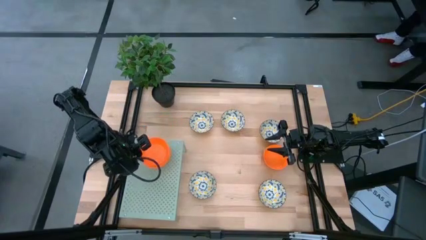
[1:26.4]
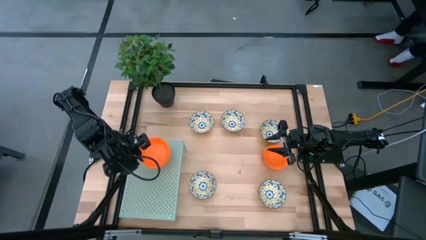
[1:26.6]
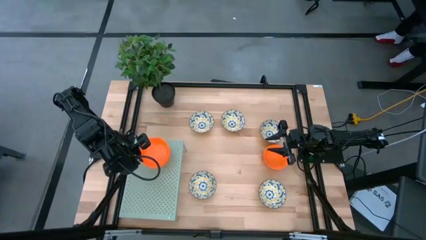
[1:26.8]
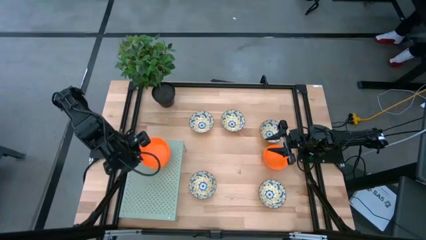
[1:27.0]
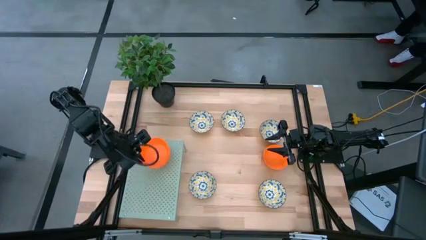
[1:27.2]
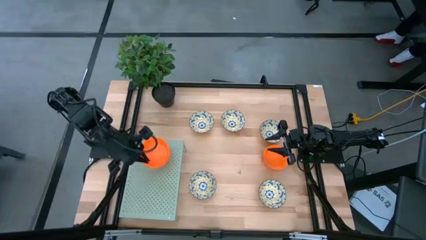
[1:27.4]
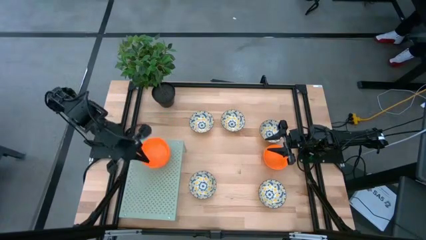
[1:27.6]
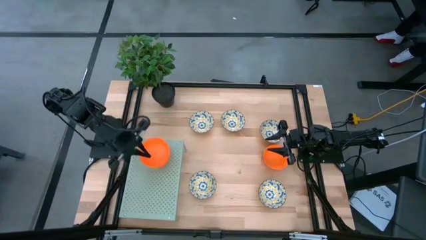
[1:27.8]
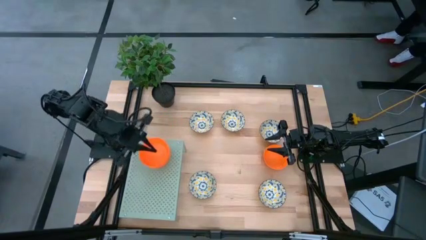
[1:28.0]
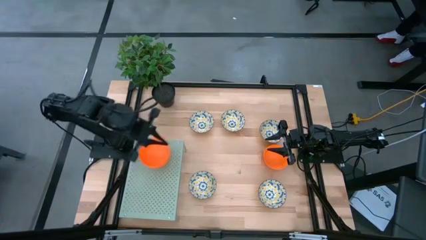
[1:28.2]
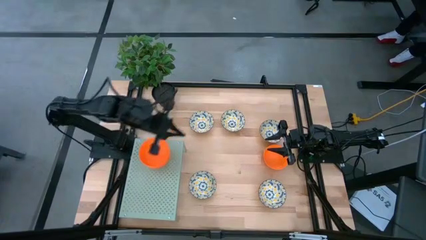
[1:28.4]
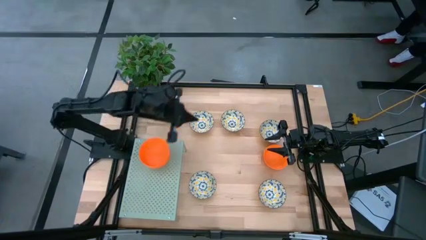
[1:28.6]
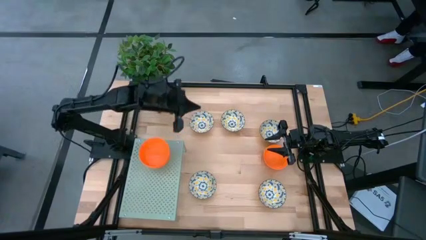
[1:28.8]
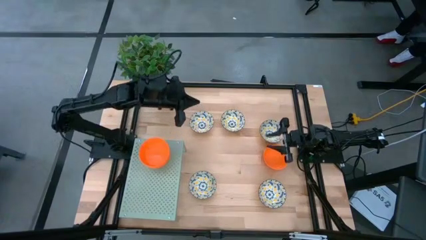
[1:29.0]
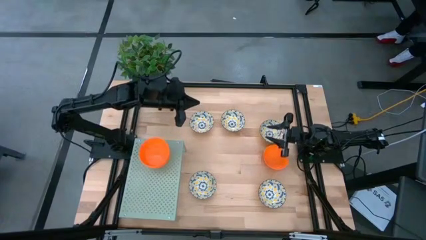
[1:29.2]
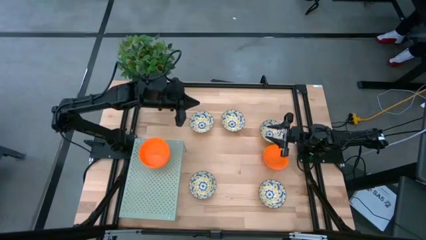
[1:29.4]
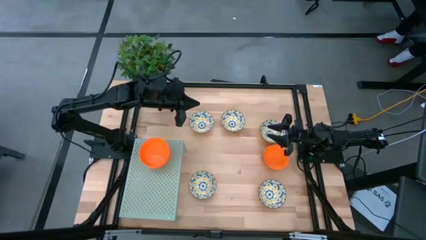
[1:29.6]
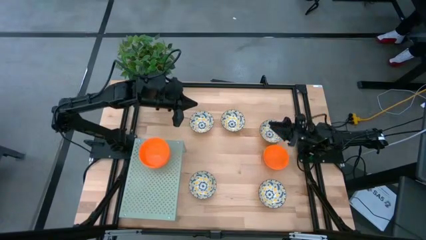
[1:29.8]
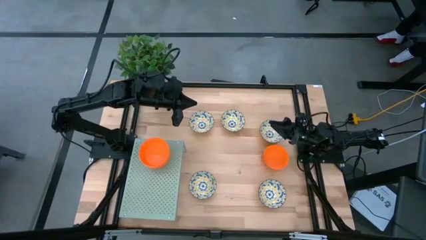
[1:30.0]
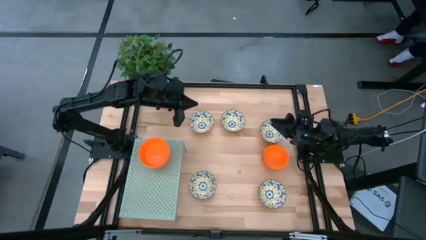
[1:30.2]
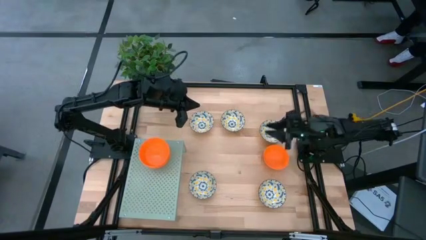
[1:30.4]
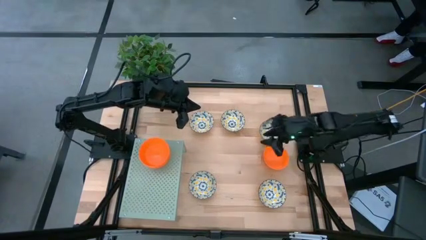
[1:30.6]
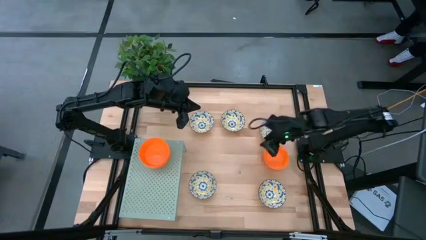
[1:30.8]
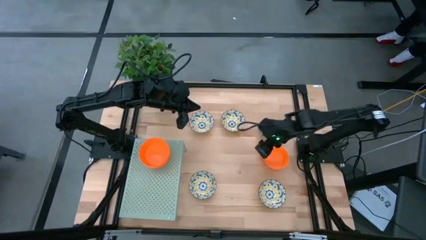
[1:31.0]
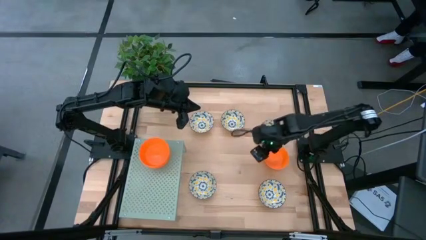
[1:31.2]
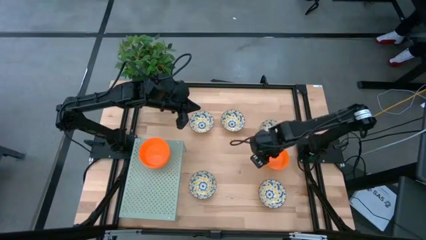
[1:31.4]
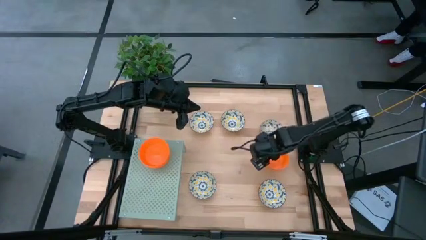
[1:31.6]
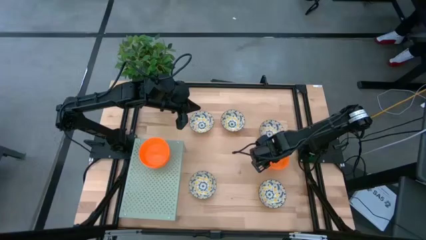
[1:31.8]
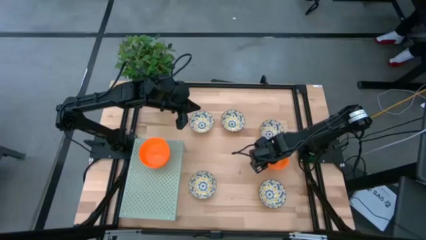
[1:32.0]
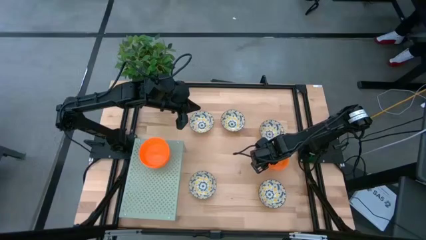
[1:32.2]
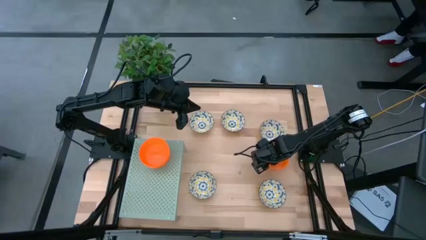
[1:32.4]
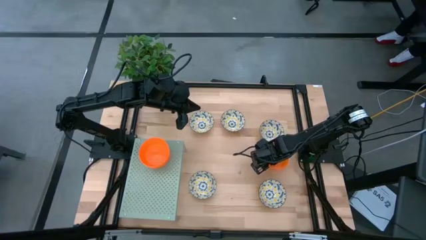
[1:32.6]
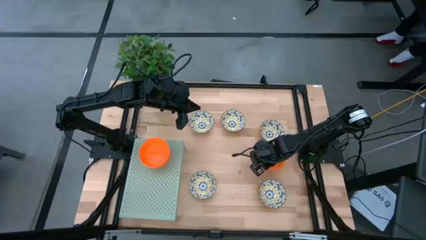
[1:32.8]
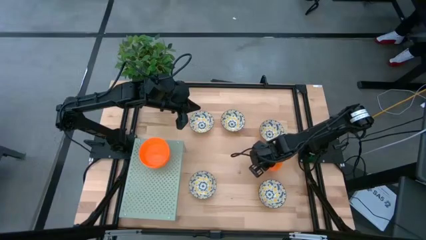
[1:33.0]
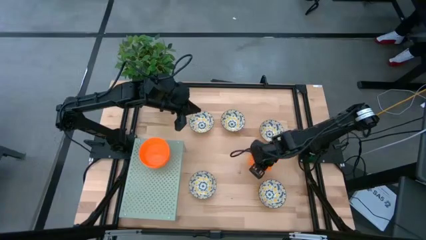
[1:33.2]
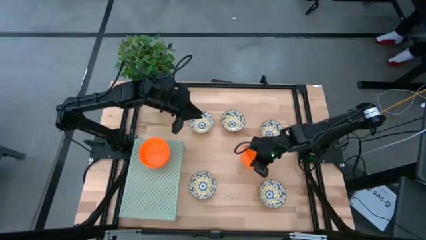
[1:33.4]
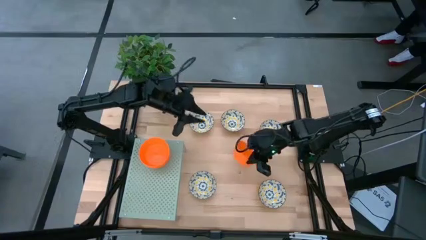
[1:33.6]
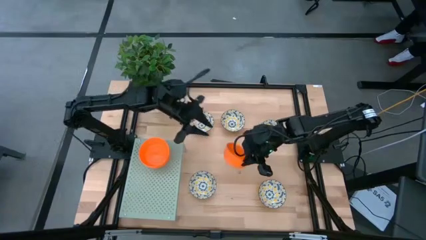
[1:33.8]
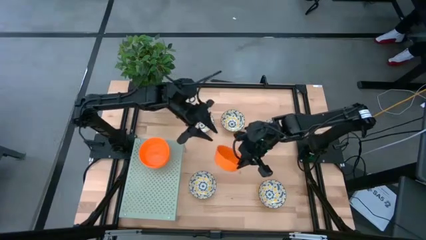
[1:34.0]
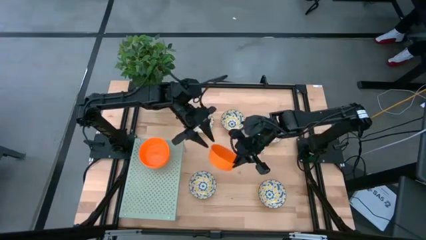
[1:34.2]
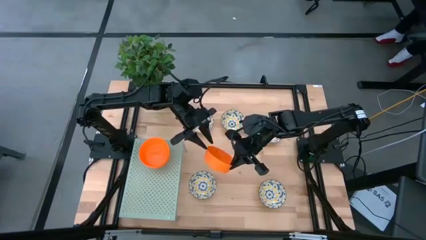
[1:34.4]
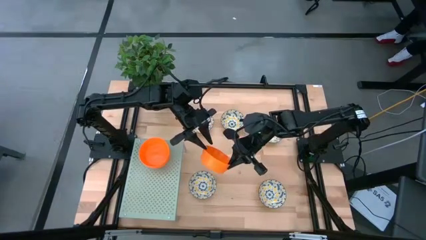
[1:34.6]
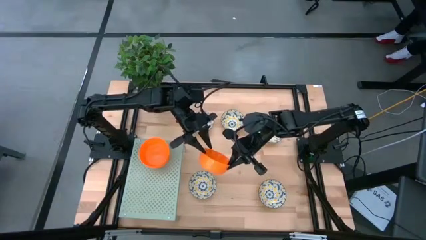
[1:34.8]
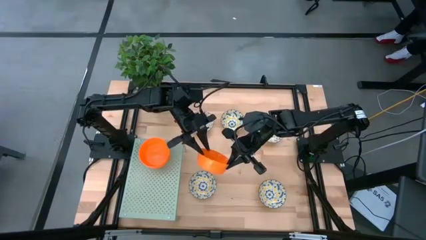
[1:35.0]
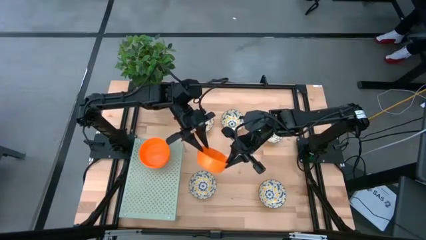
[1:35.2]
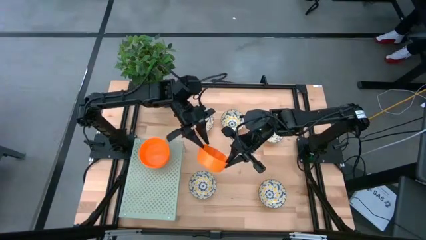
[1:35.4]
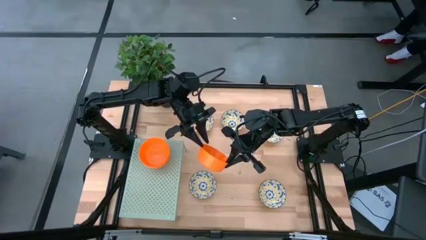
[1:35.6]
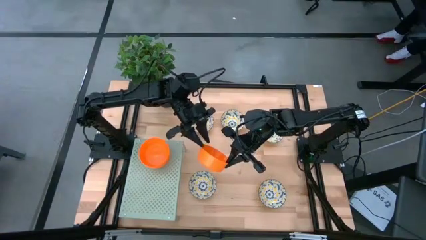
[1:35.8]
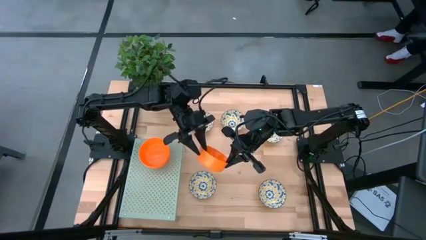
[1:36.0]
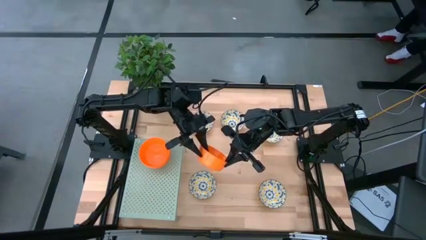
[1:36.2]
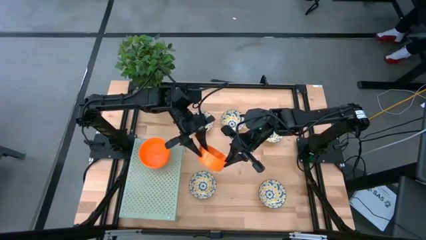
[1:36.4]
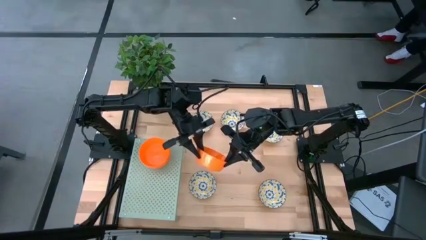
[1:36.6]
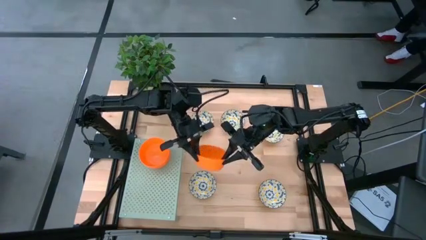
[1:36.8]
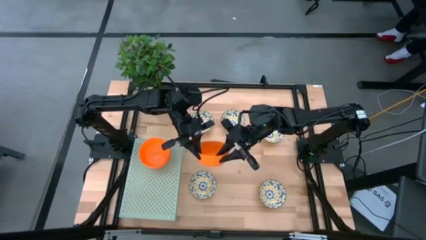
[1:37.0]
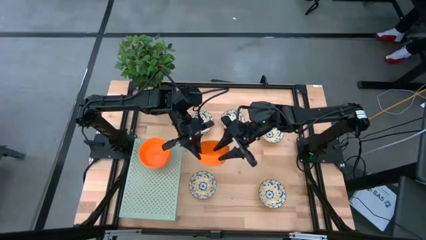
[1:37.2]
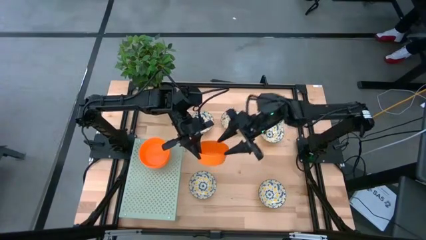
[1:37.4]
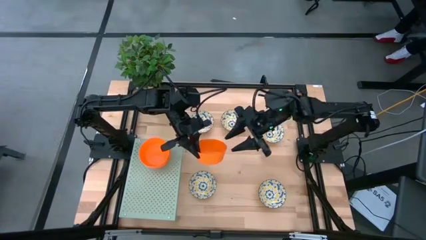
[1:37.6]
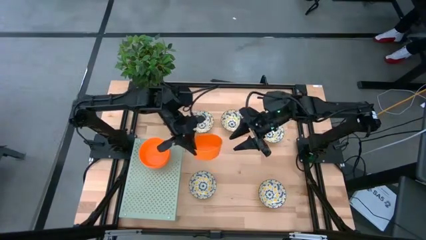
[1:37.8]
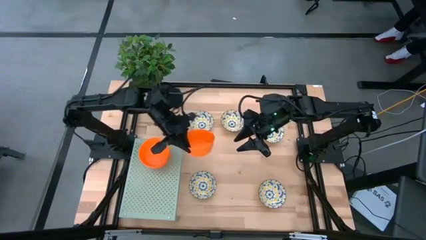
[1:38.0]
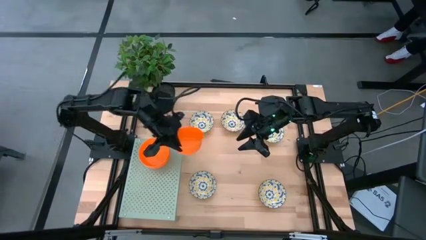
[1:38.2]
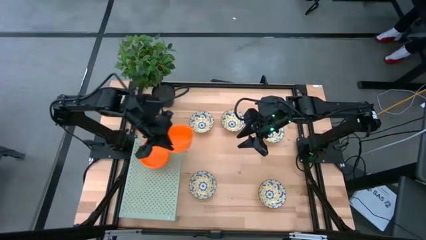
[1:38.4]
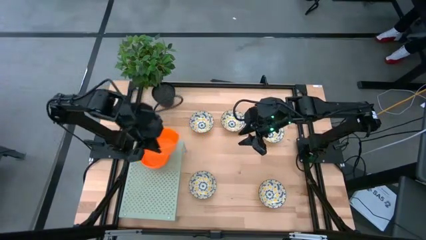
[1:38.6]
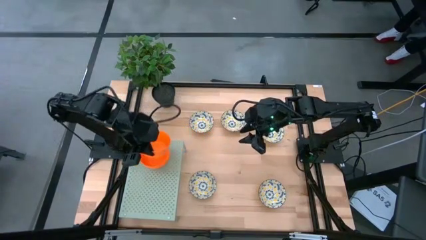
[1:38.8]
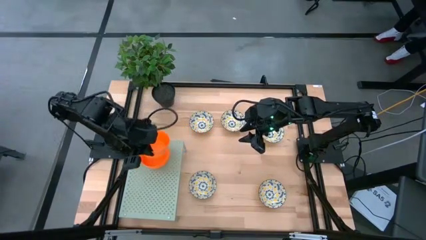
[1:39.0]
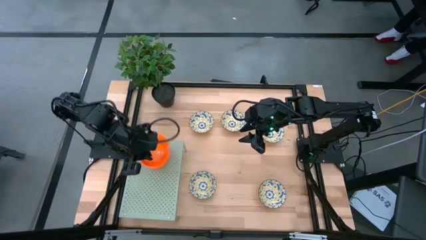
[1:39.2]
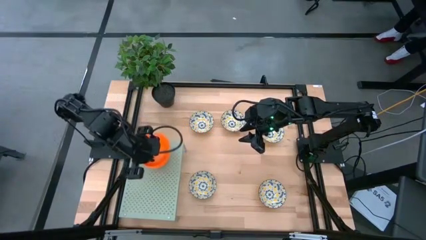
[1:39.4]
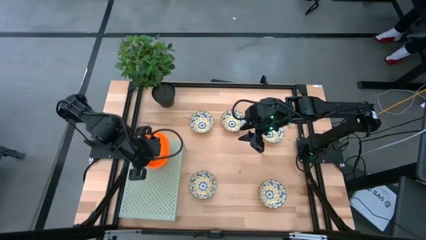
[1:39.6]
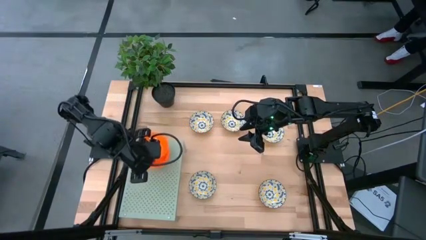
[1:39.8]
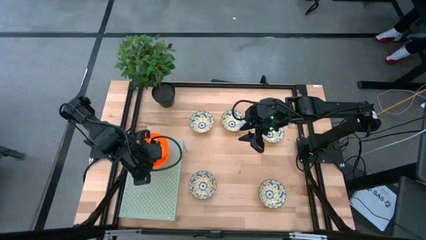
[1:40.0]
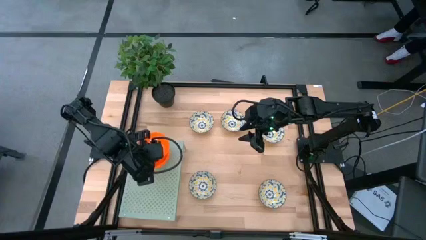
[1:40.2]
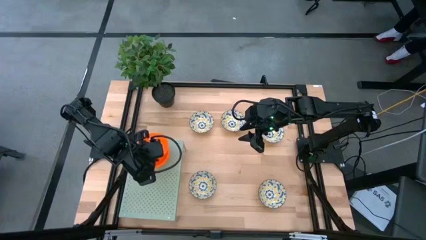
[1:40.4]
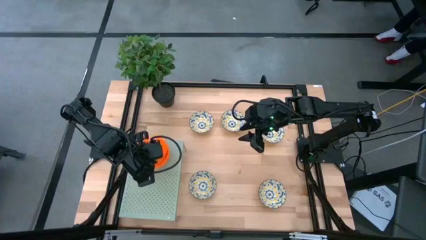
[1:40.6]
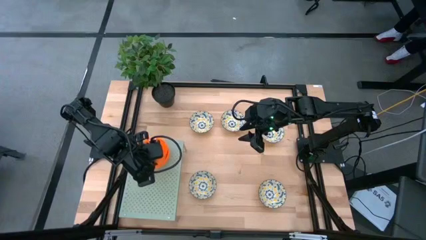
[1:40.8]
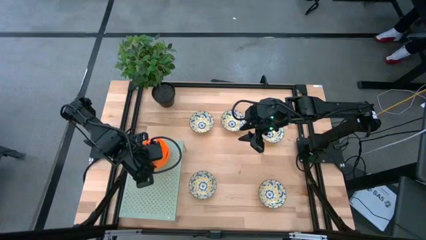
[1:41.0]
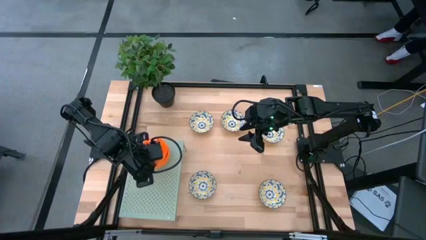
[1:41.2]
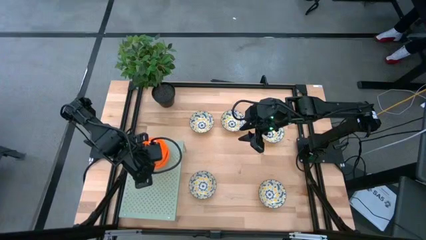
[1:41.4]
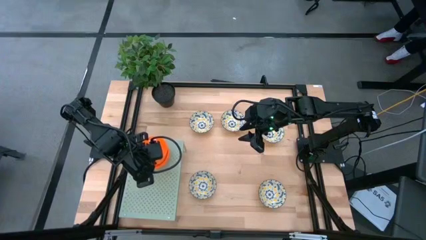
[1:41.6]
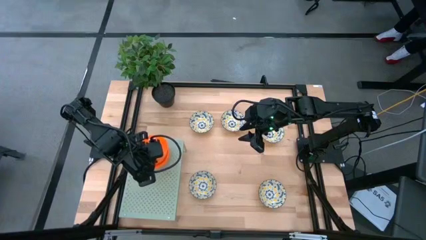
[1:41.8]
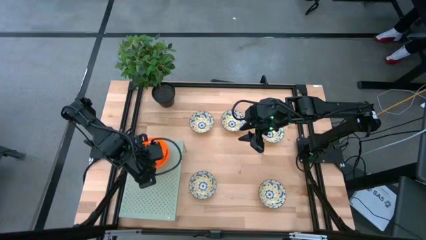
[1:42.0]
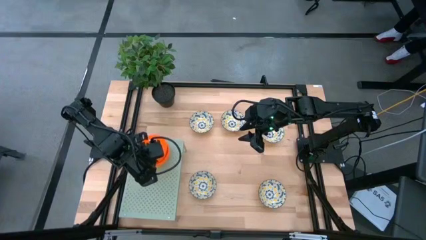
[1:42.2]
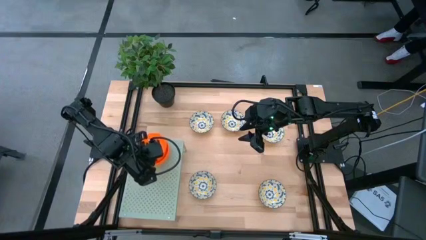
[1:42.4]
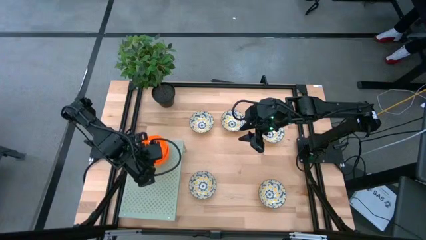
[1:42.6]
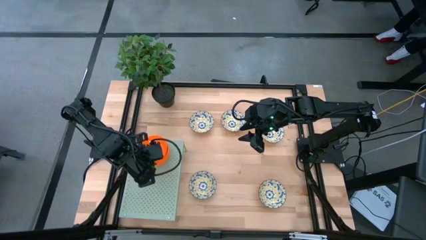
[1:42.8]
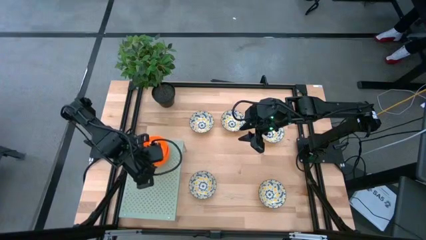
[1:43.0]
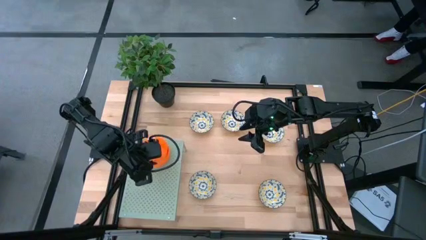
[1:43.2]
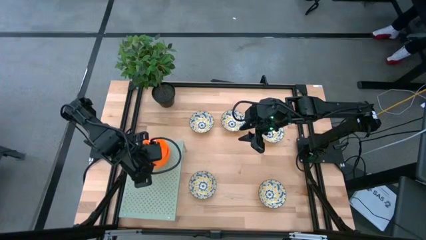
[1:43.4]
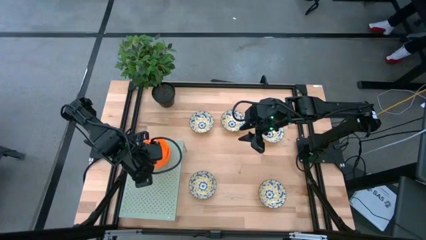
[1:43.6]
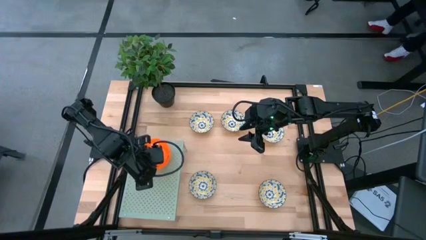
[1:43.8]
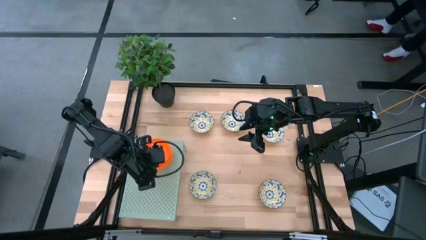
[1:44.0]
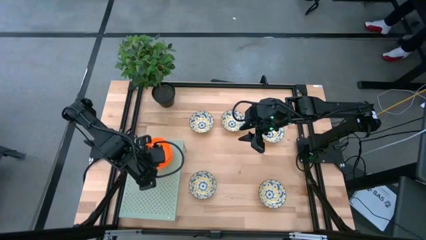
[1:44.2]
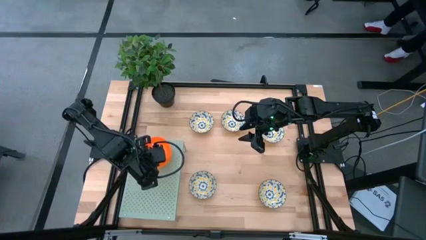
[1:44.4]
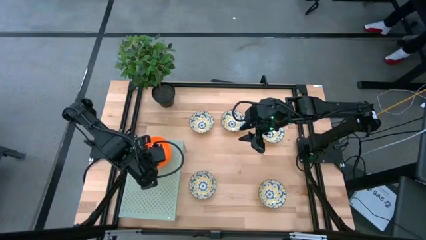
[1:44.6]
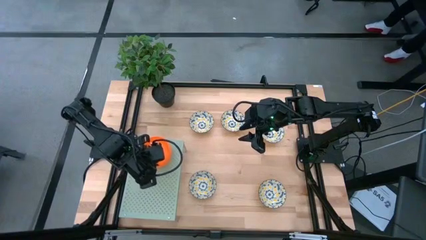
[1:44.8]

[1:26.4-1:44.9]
Task: Pick & Place Mini bowls
Stack the orange bowl on top of the orange bowl on the shelf
